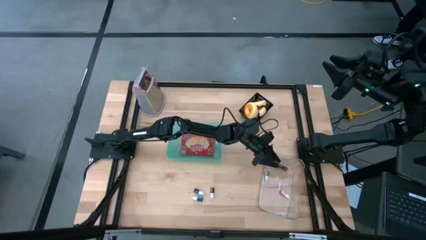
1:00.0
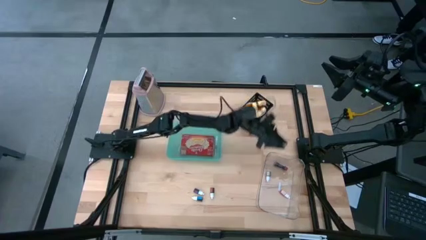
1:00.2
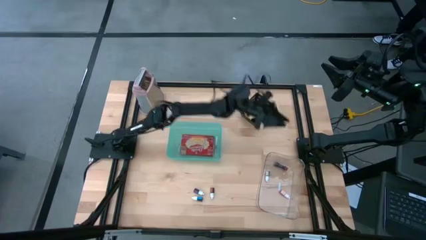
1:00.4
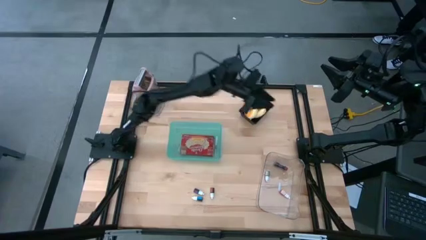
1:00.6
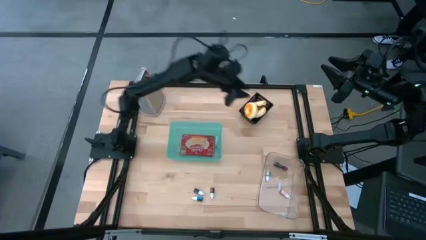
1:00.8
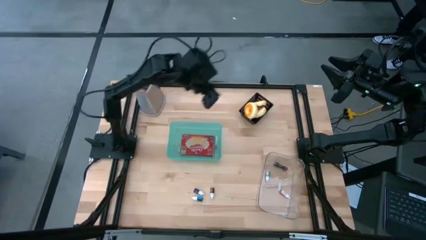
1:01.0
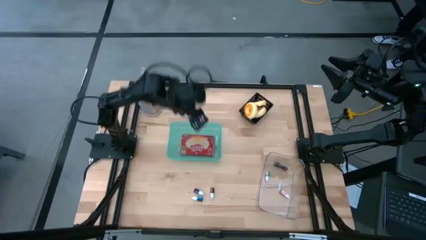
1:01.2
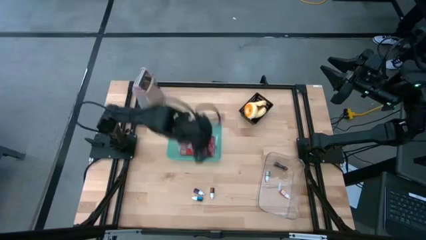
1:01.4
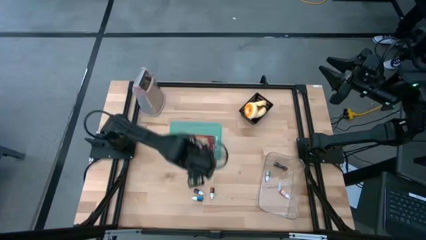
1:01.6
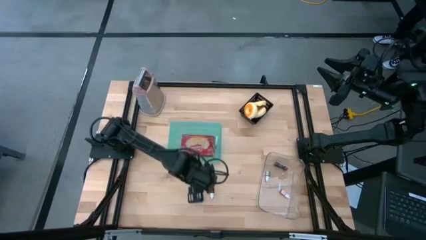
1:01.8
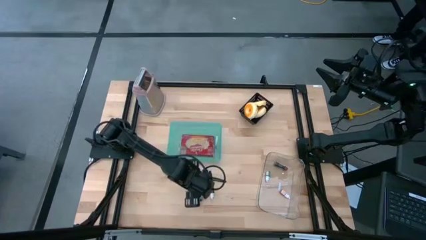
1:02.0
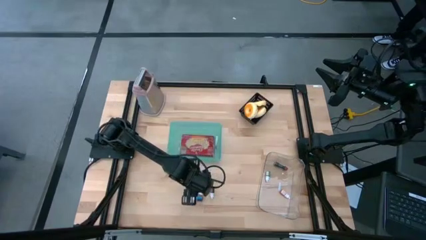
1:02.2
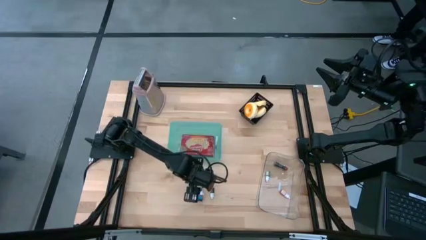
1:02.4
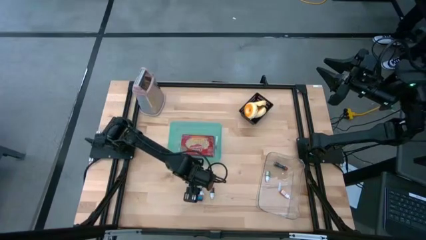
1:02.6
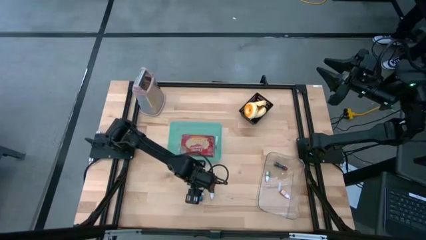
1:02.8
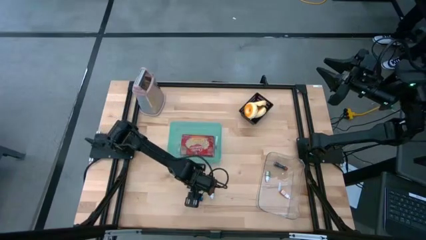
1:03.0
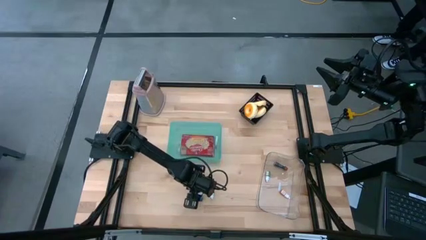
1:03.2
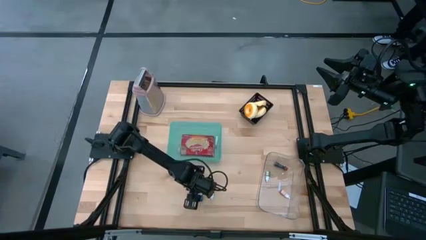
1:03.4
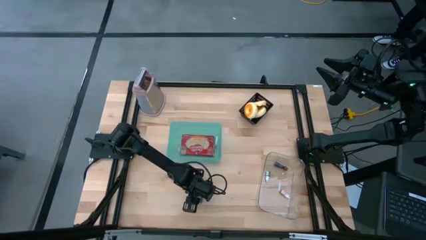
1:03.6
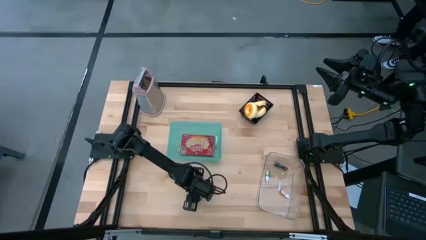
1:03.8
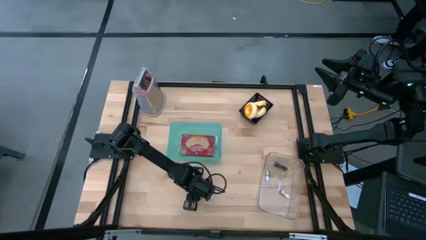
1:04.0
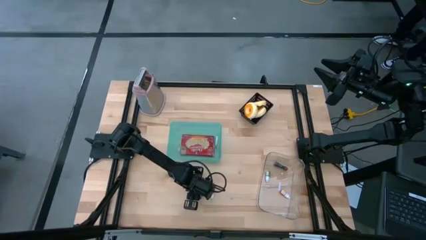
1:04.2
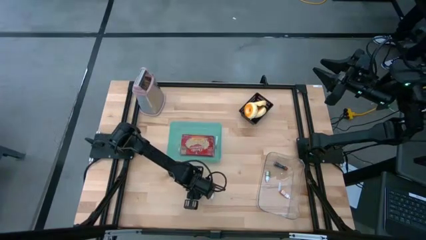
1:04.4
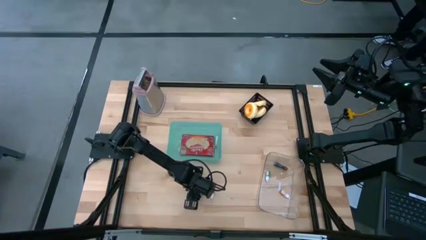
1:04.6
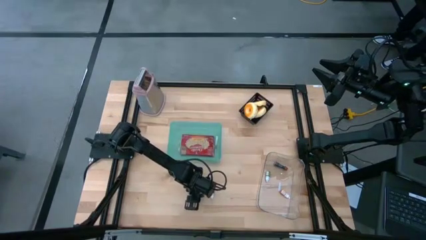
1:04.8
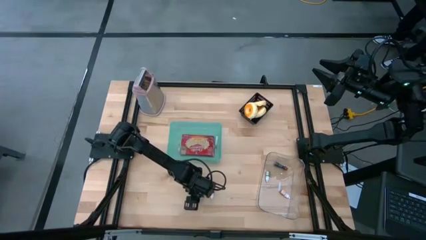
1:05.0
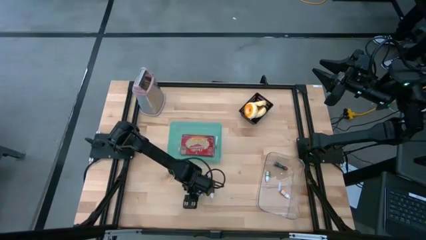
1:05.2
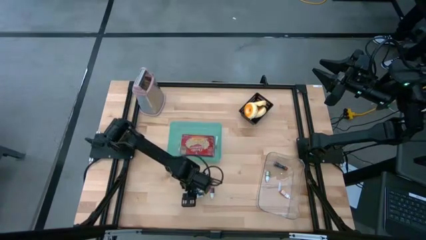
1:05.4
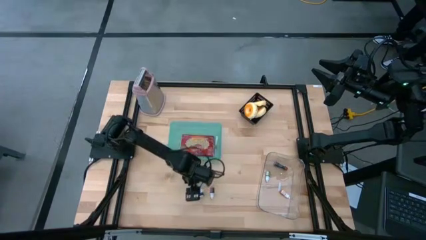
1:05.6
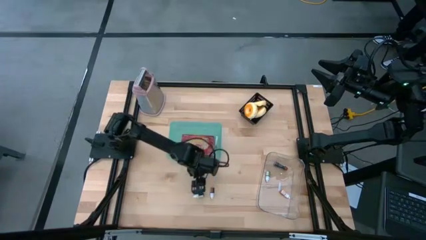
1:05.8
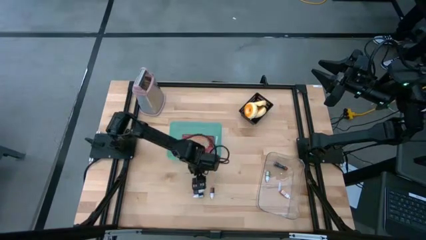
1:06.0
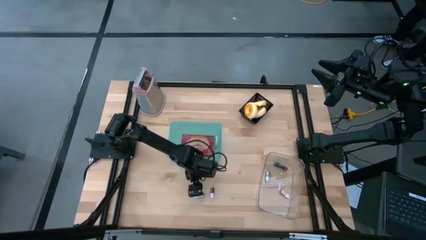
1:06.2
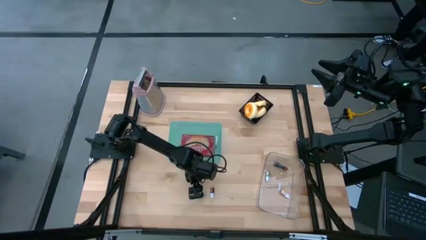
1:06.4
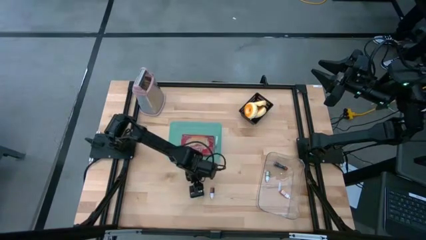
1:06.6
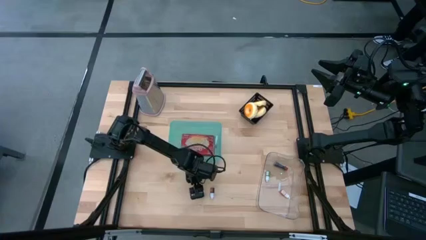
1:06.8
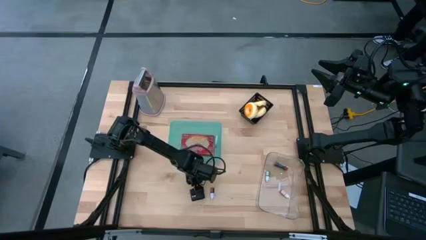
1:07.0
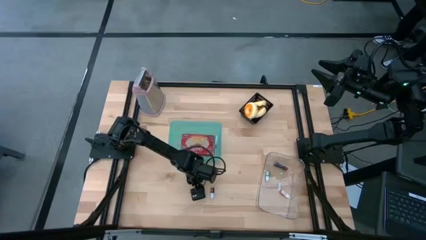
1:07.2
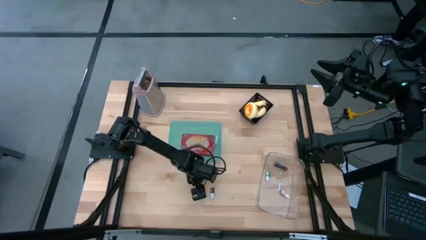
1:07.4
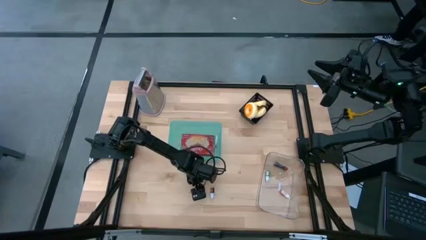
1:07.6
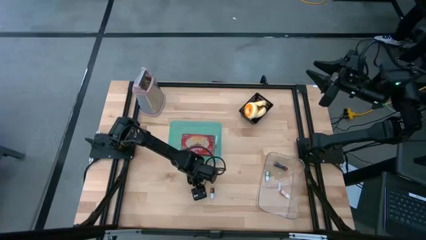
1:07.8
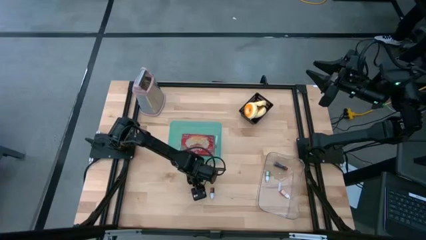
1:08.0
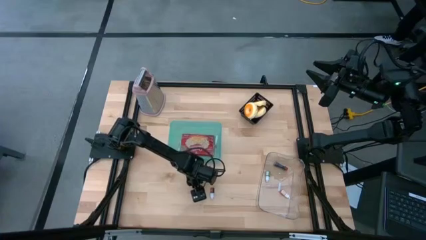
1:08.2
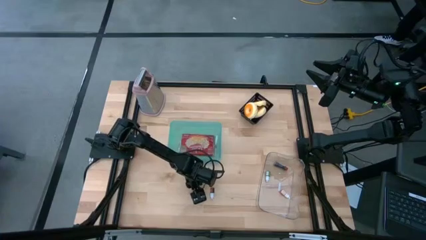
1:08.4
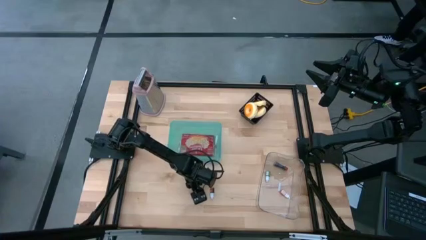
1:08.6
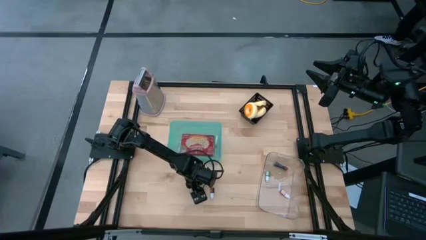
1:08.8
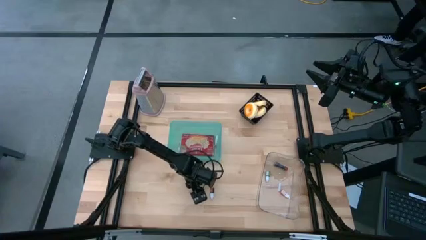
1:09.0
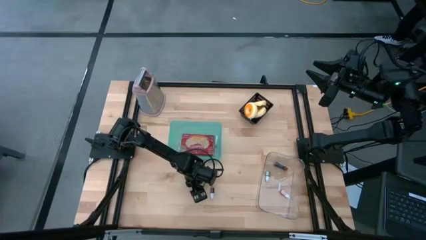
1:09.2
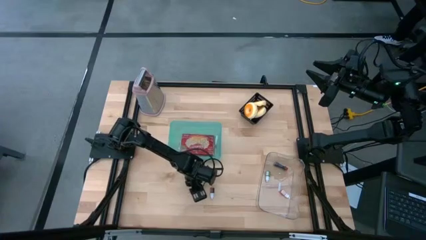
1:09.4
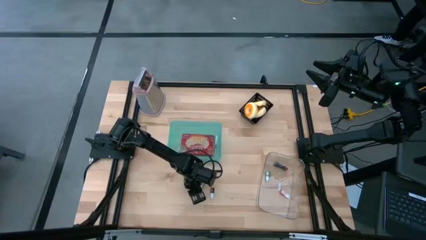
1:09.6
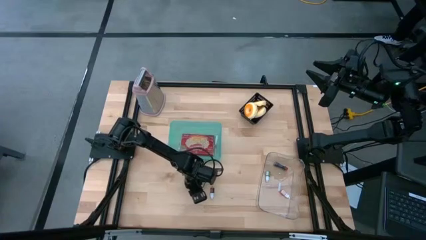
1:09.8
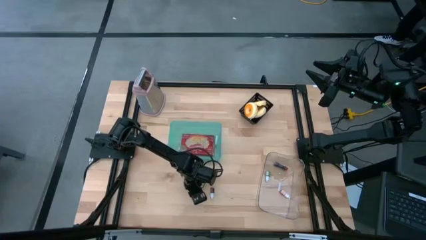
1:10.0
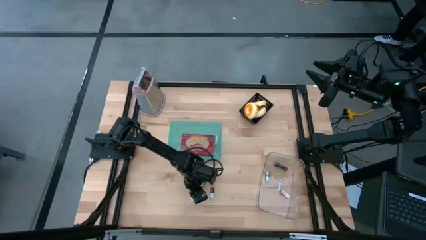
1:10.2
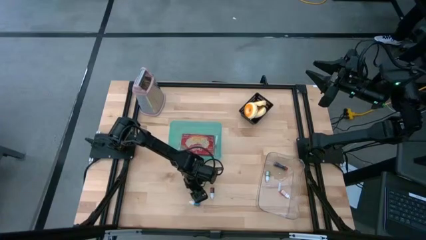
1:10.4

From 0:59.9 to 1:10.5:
Put the purple food coloring bottle into the transparent bin

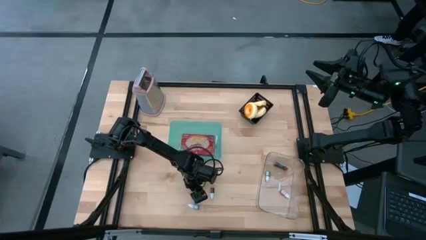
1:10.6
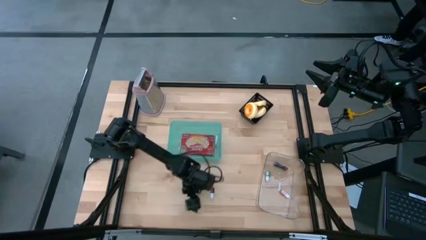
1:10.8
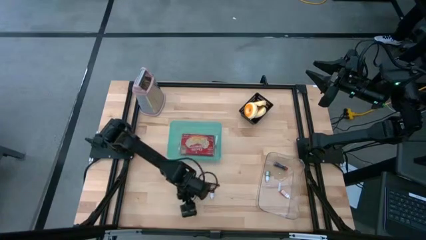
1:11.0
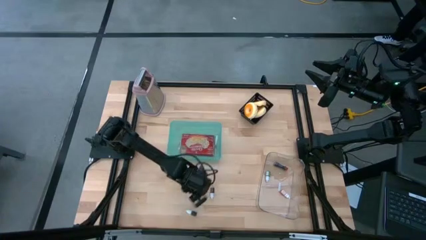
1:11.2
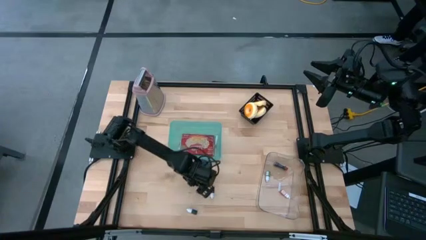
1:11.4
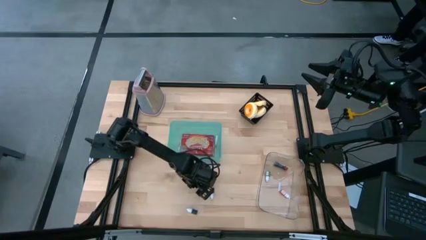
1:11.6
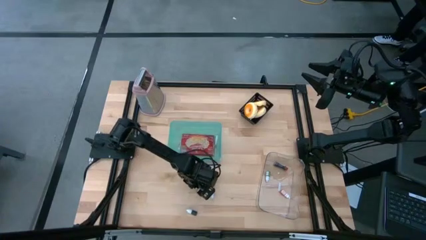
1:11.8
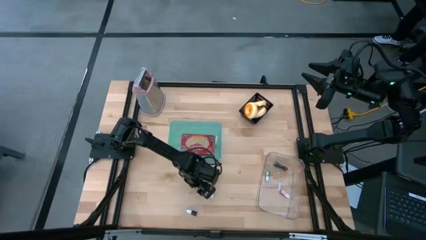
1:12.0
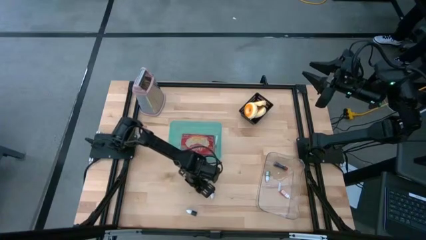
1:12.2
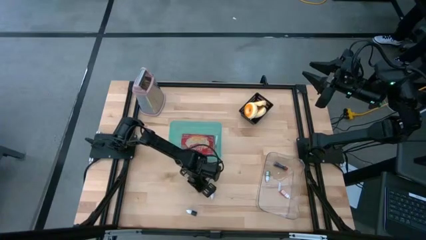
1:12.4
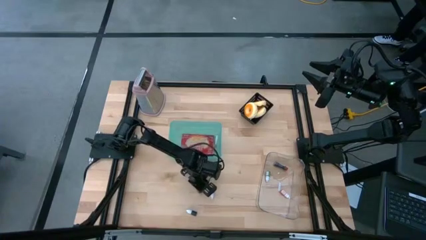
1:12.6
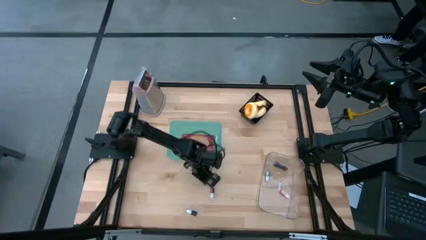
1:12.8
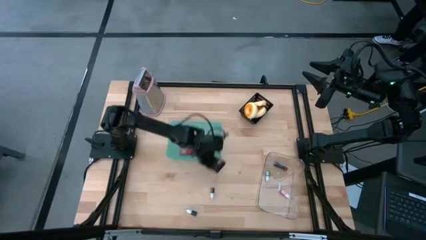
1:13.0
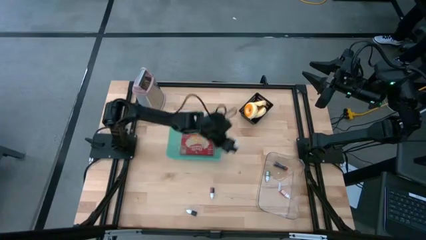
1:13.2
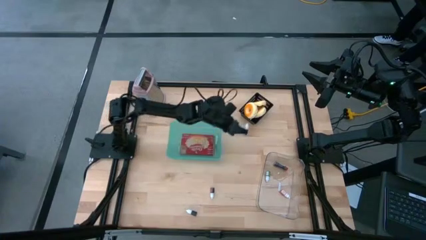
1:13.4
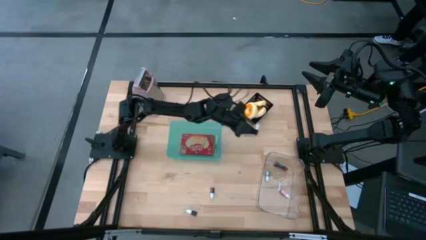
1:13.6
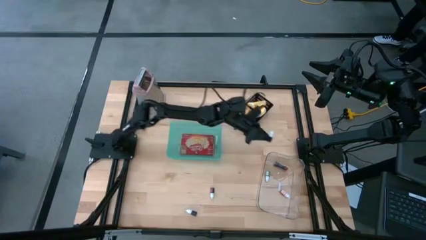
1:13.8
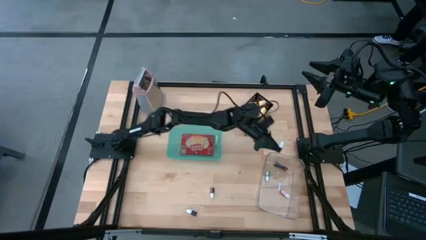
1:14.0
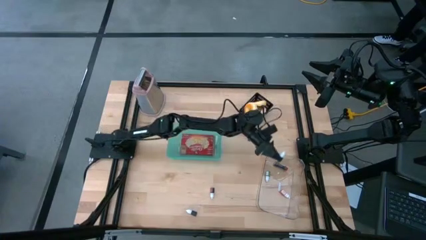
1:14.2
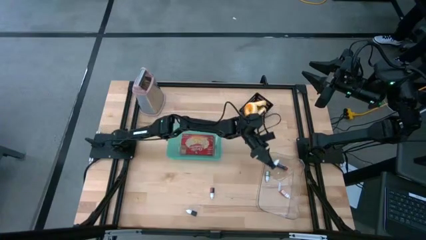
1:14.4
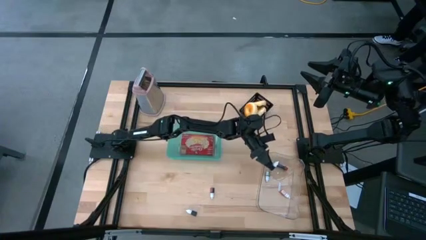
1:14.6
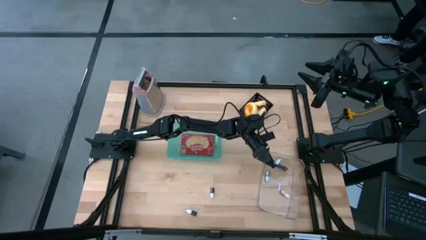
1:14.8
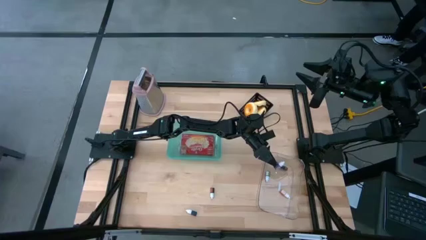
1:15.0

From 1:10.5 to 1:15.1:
Put the purple food coloring bottle into the transparent bin
